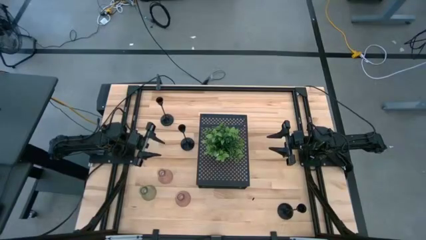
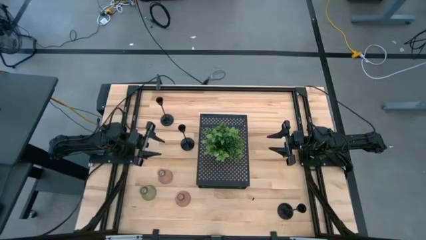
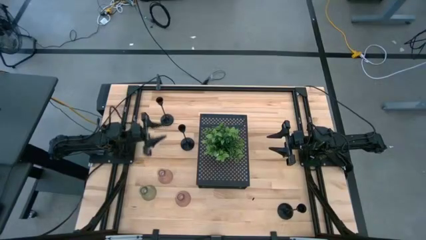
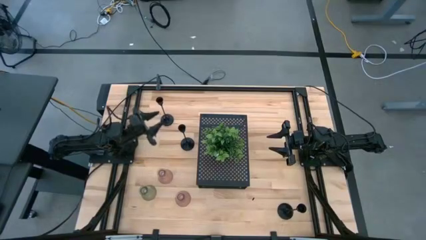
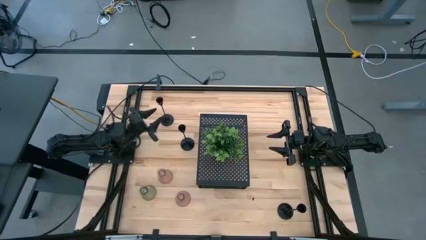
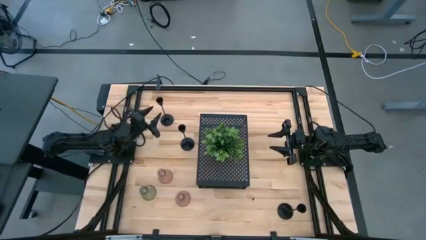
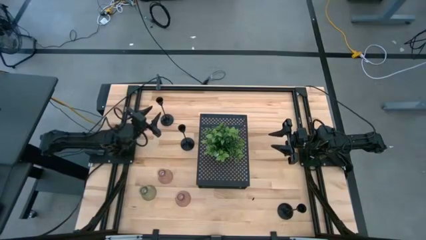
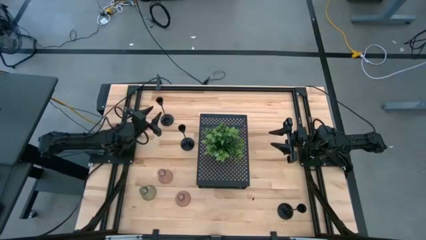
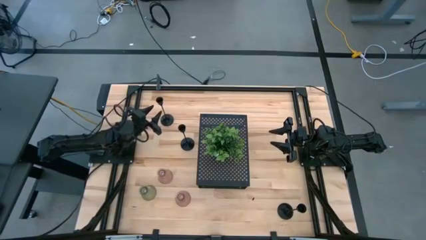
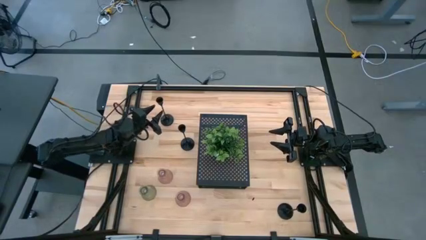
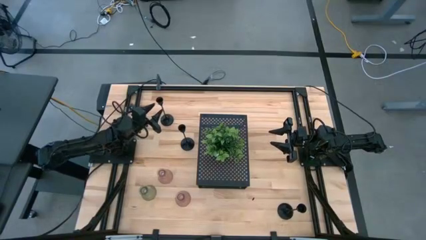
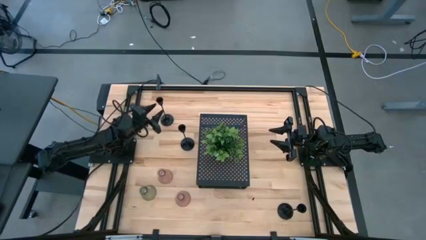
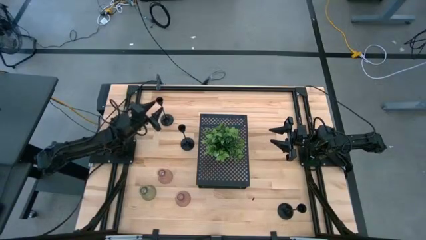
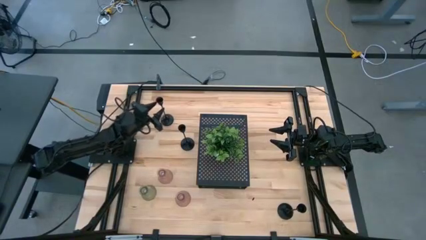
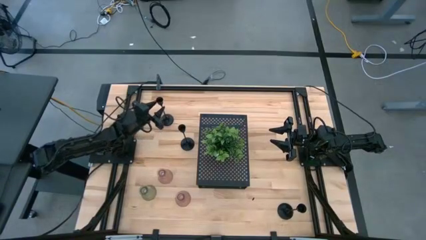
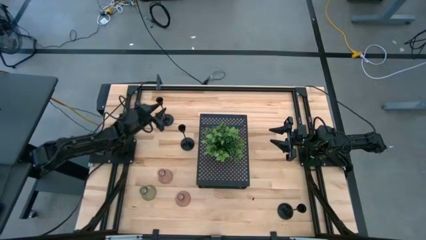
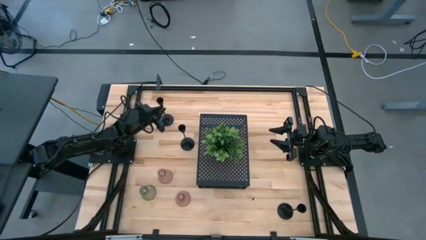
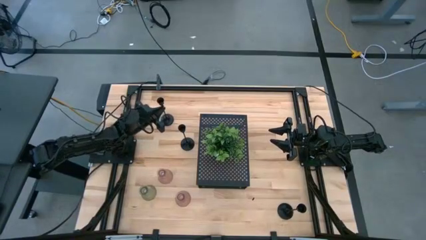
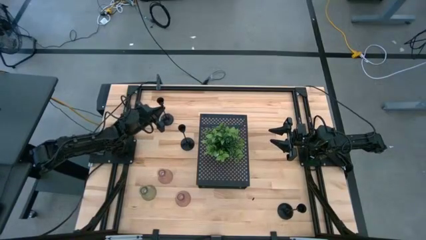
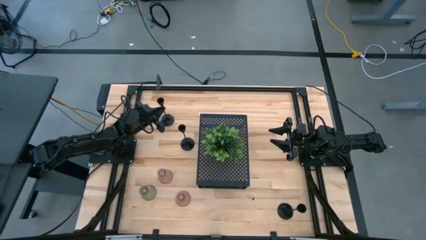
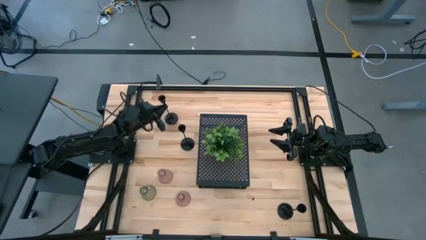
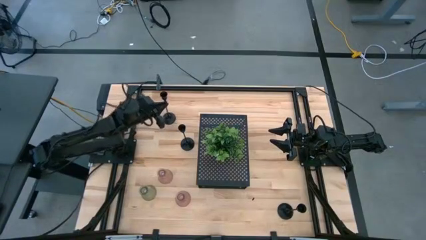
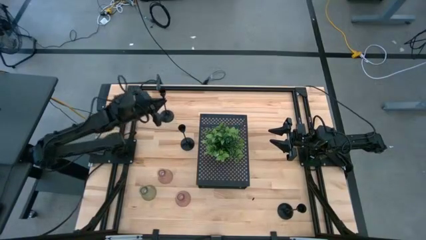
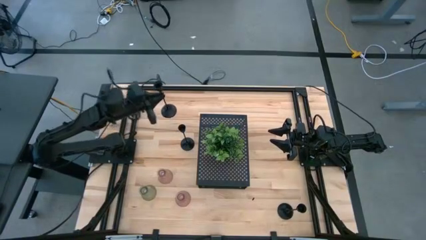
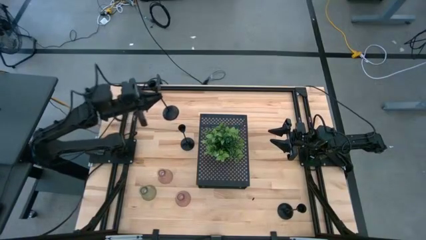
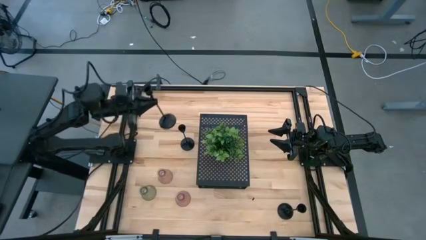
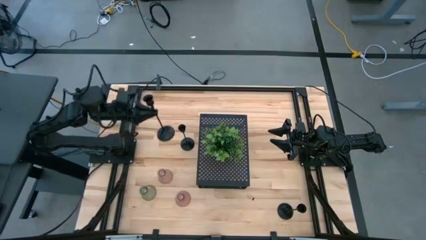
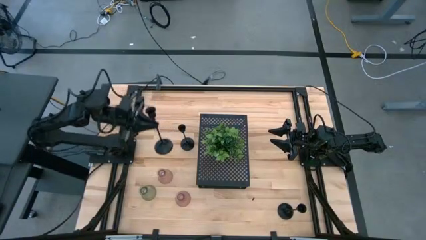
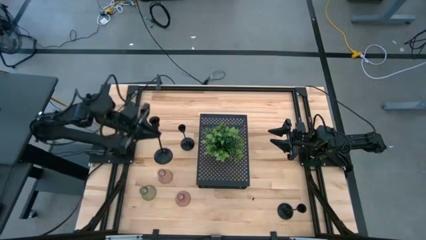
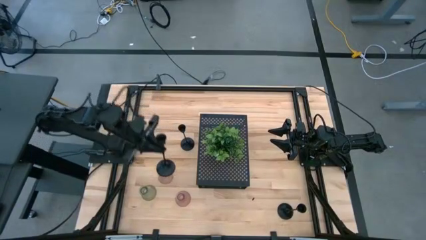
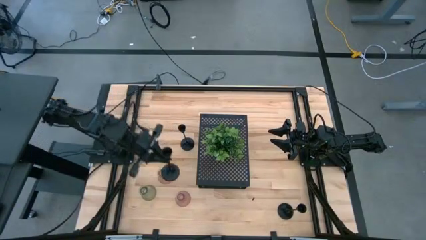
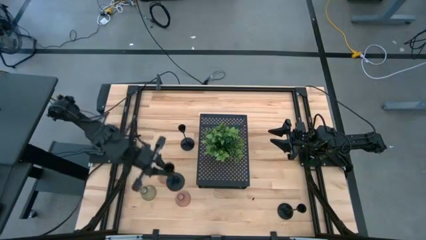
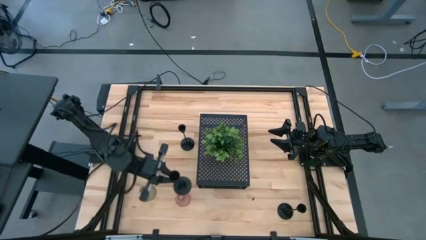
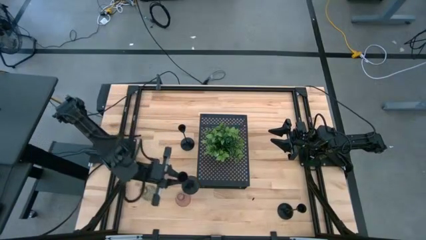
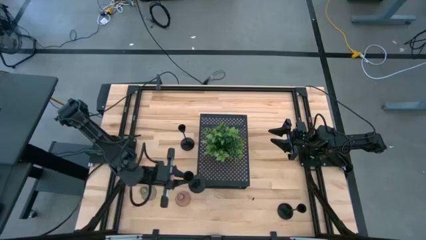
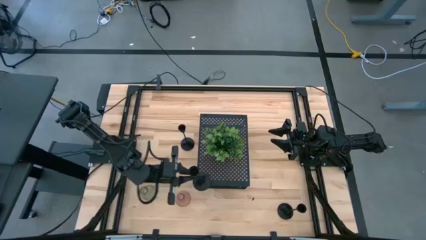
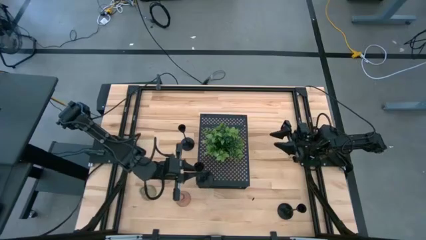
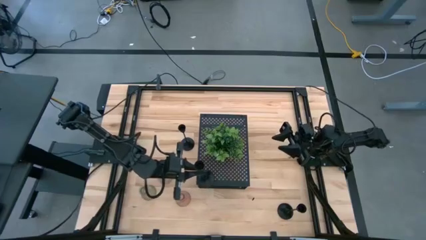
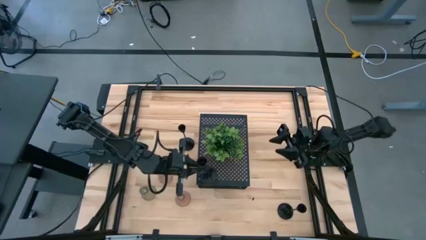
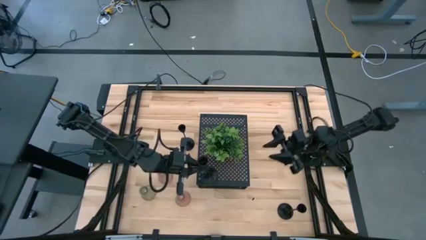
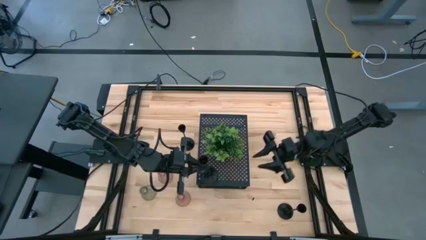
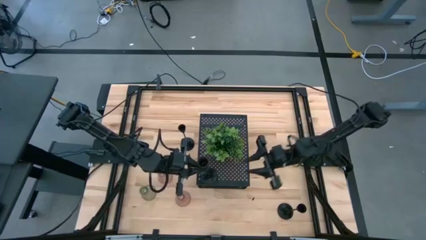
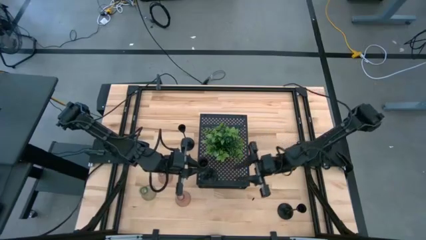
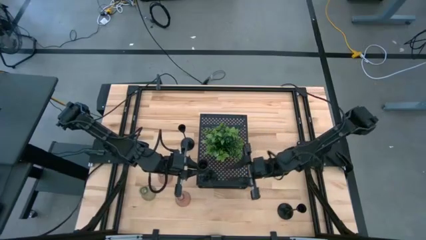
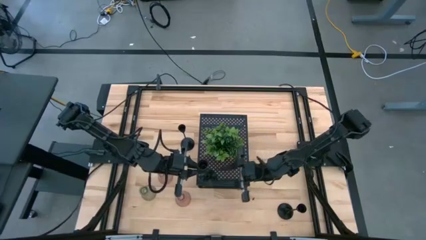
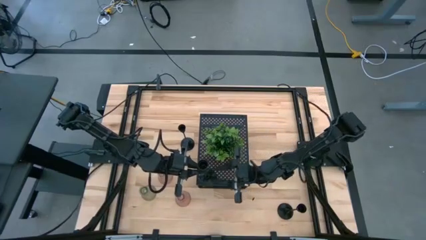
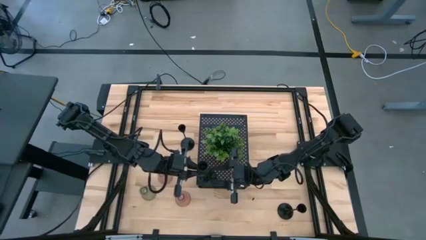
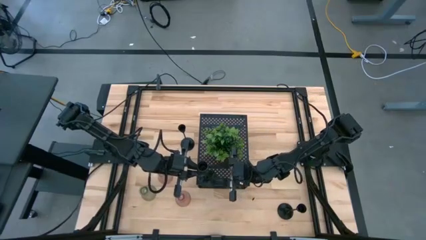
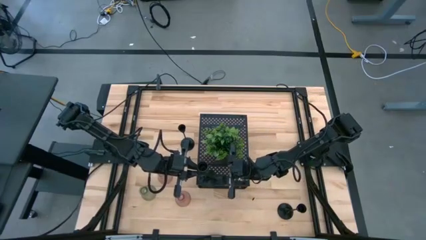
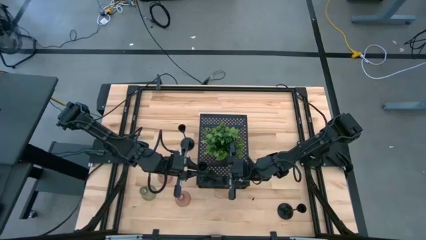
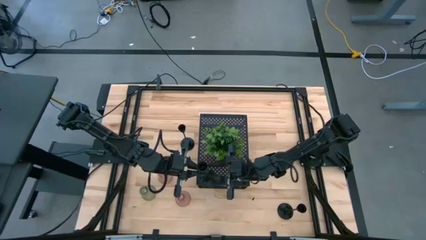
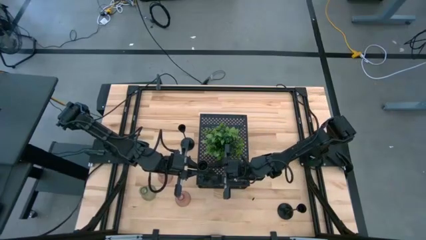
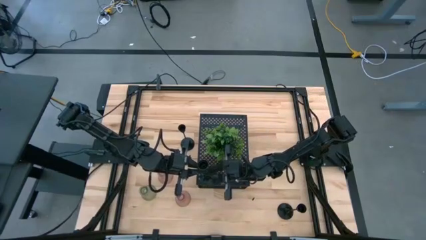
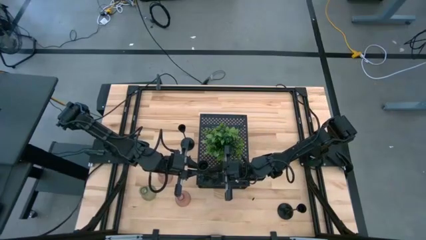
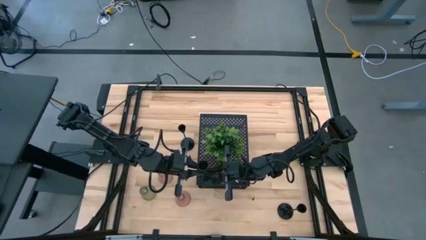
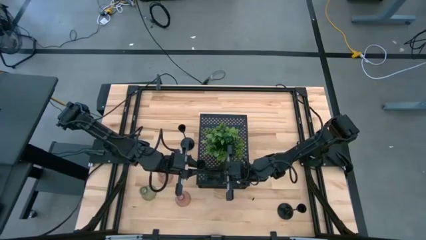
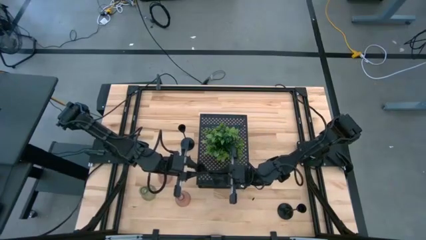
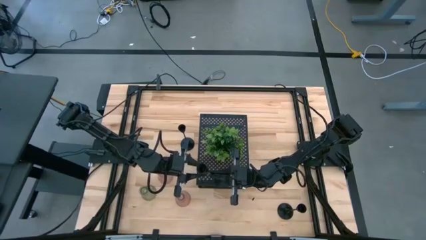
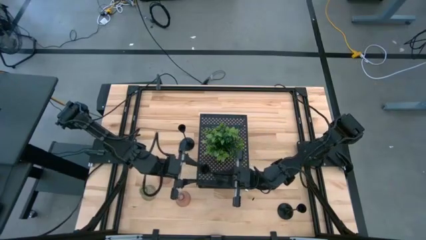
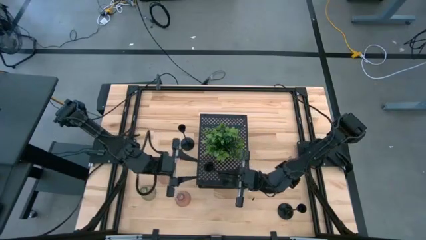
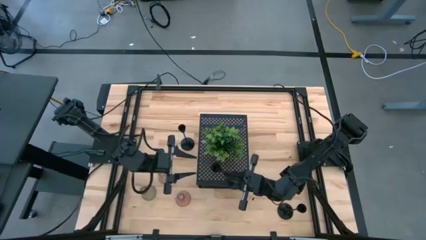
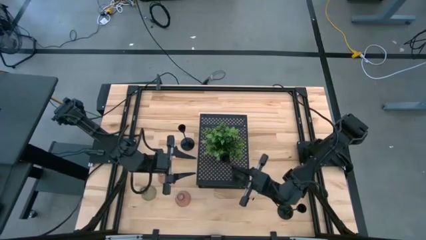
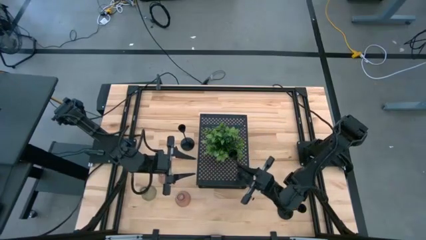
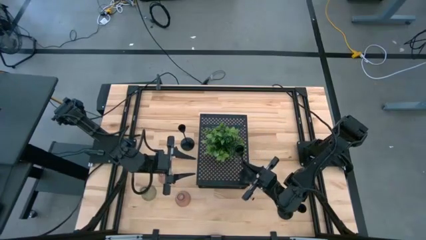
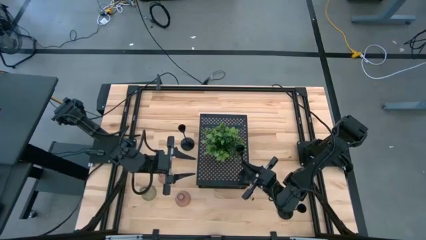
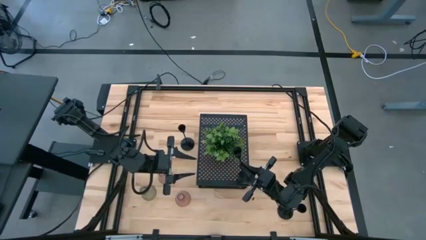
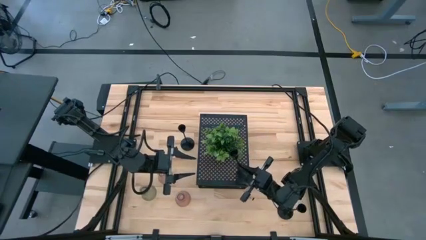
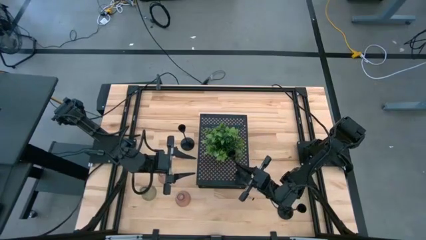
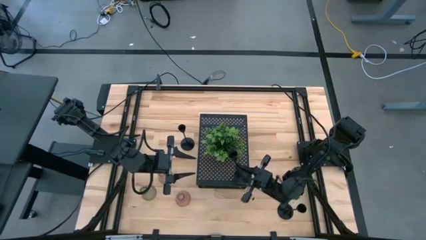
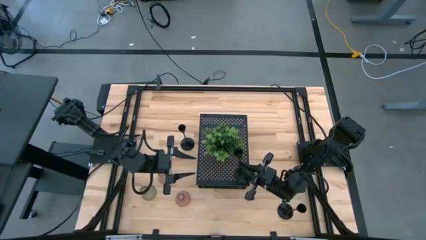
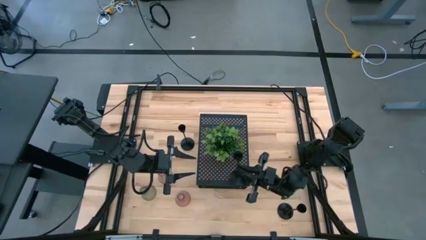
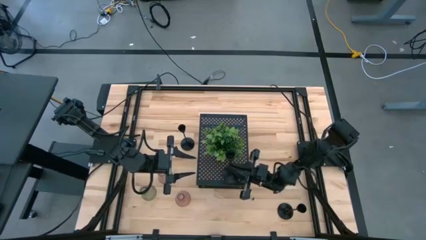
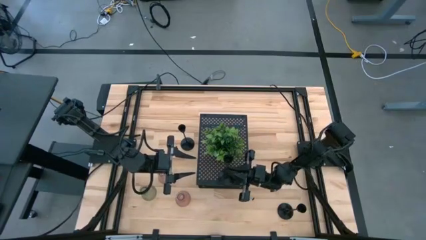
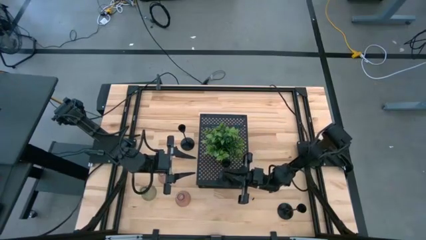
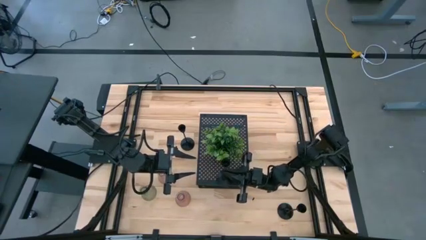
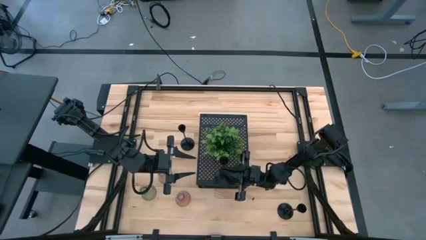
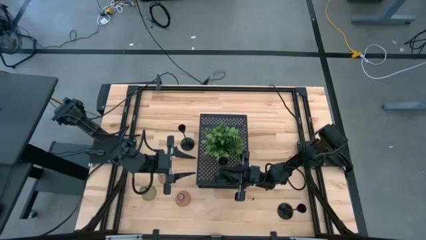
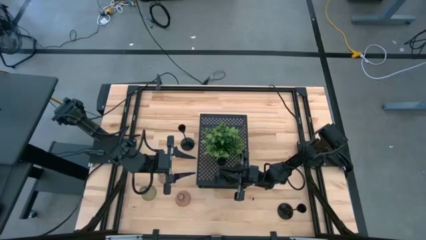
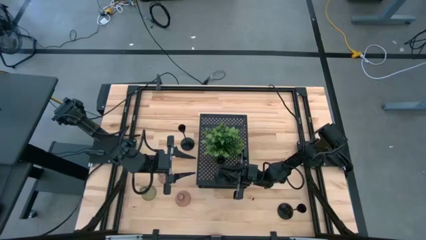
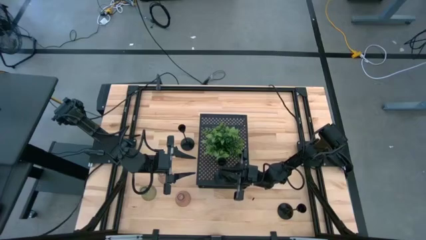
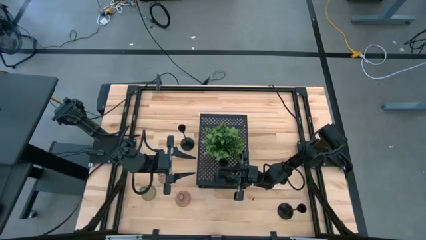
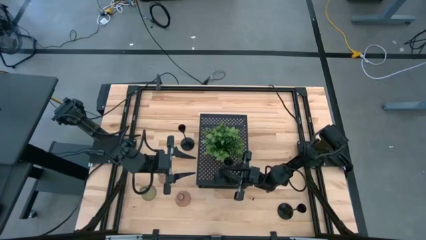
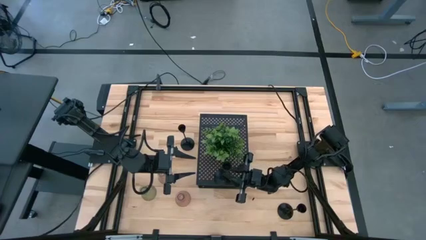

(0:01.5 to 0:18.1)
Task: Pick & Place candle stick holders
Put the top left black candle holder on the shelf
